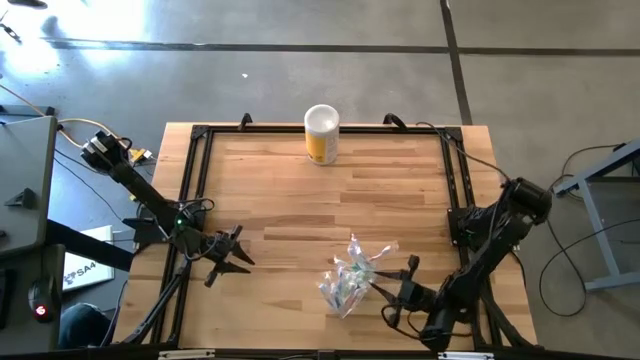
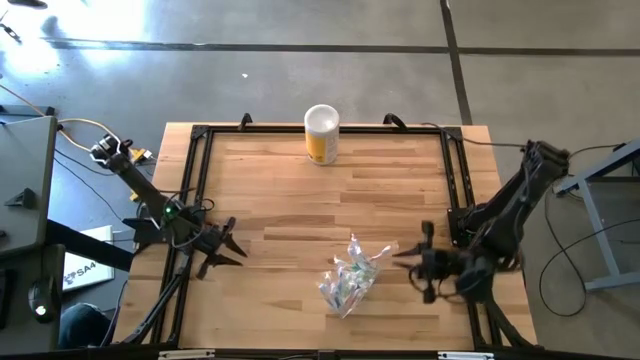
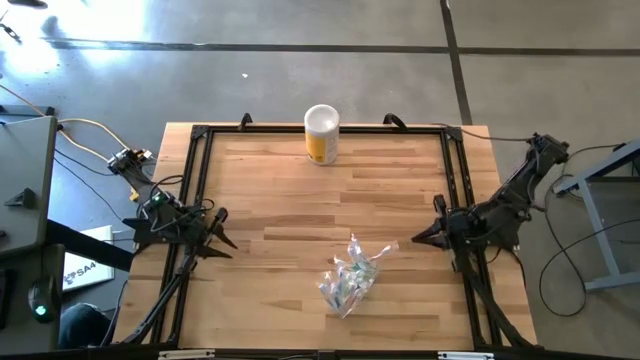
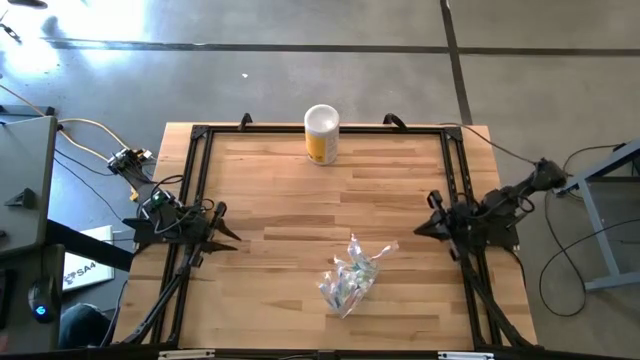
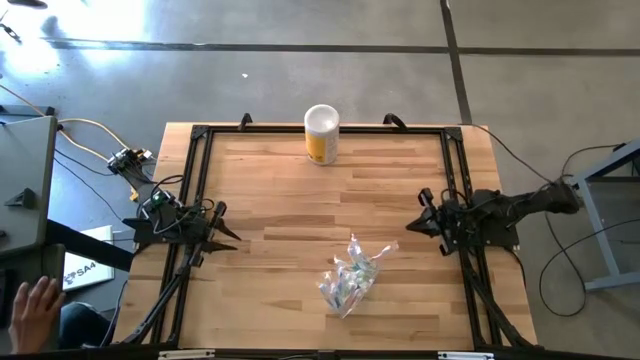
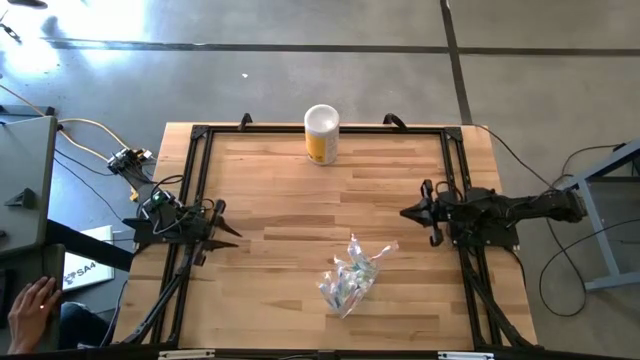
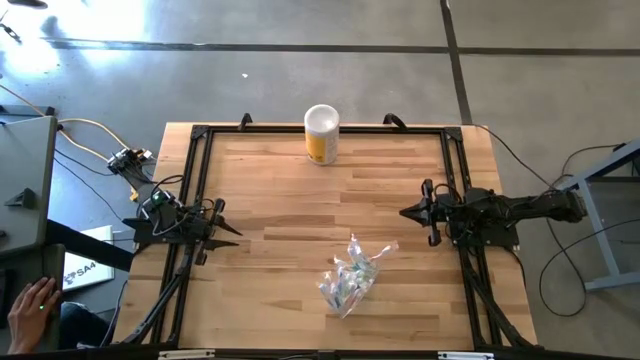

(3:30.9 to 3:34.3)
Task: Pick & Place toothbrushing station
Return to Home Position

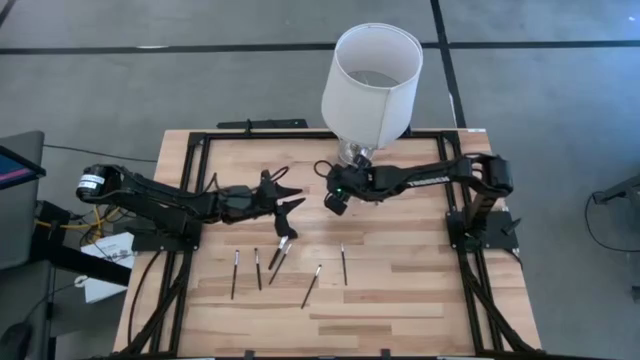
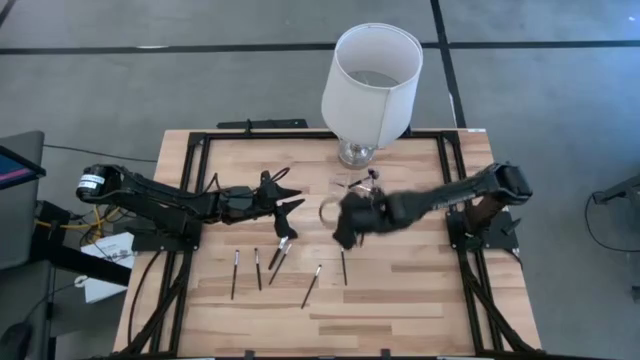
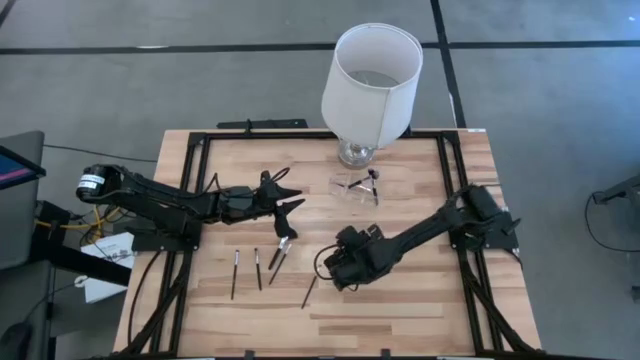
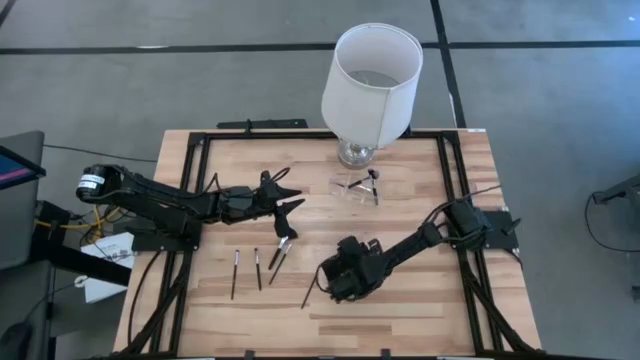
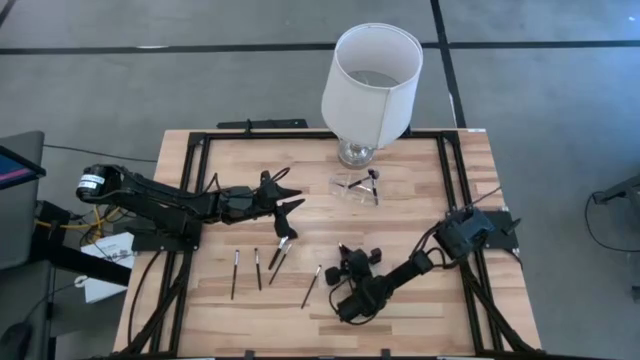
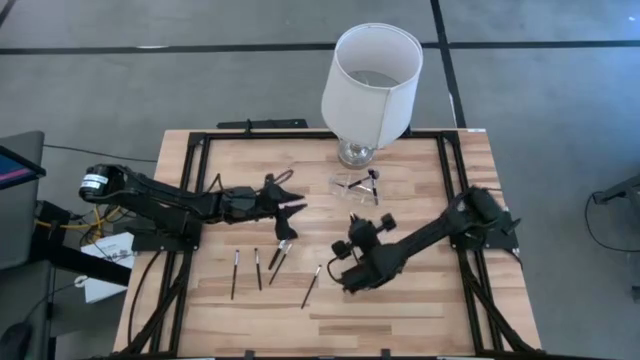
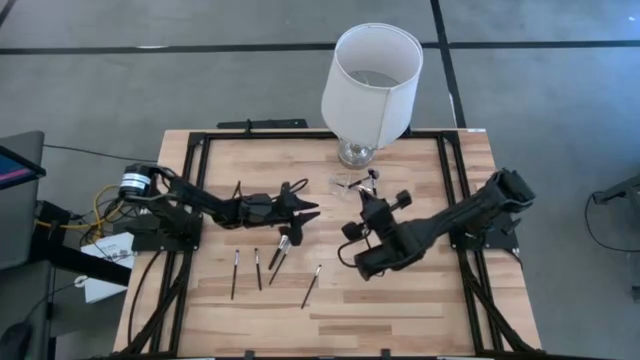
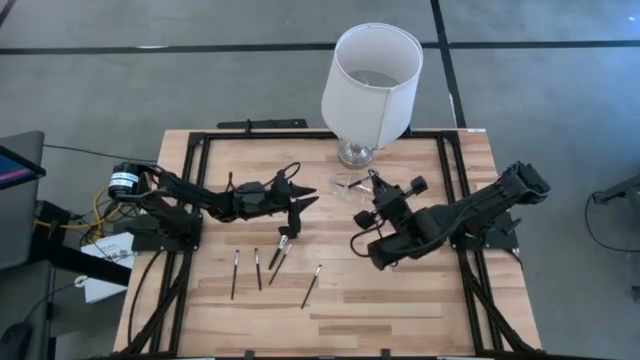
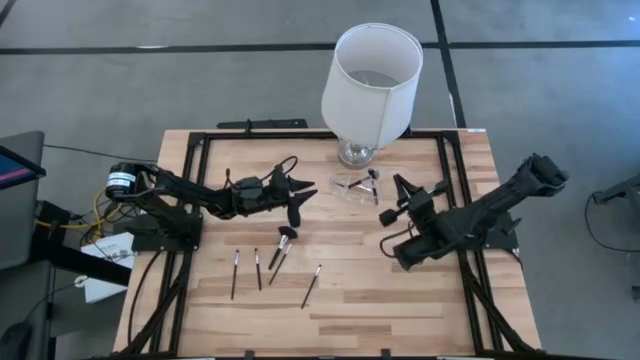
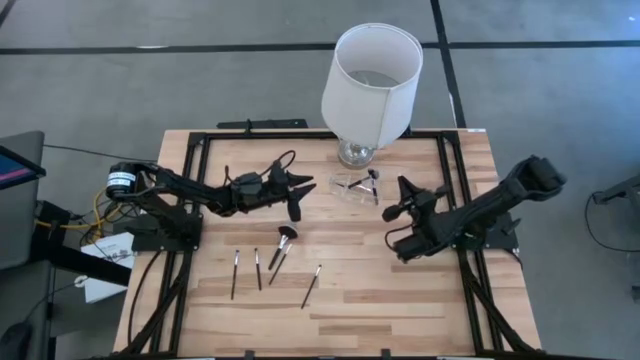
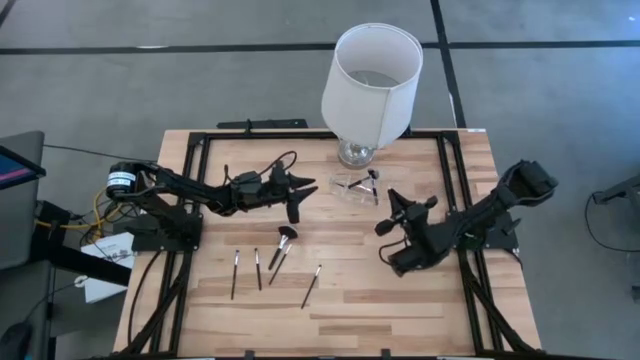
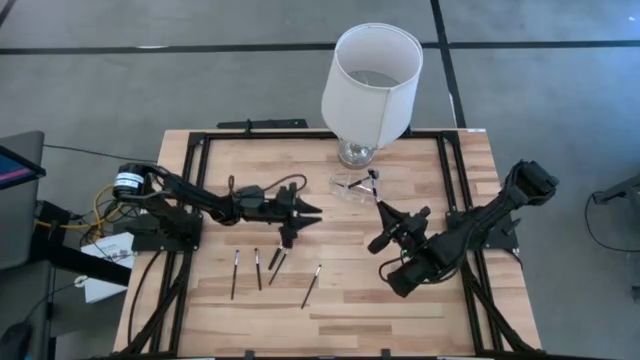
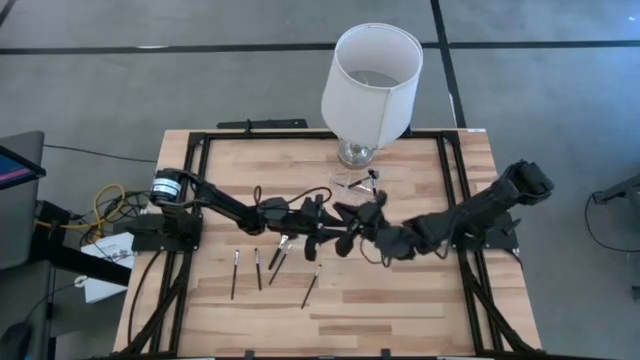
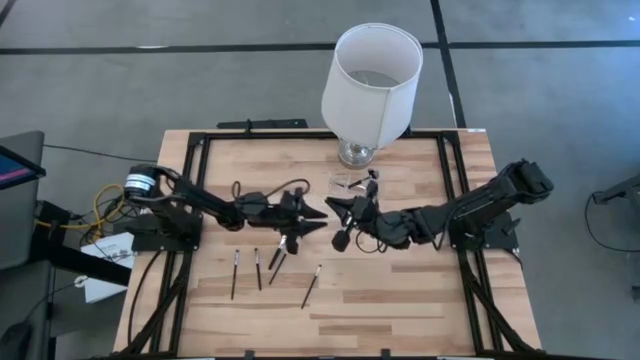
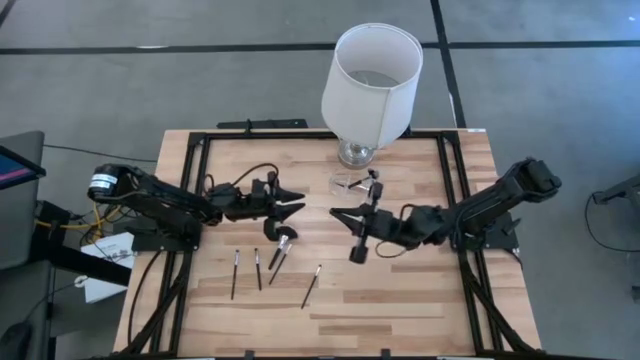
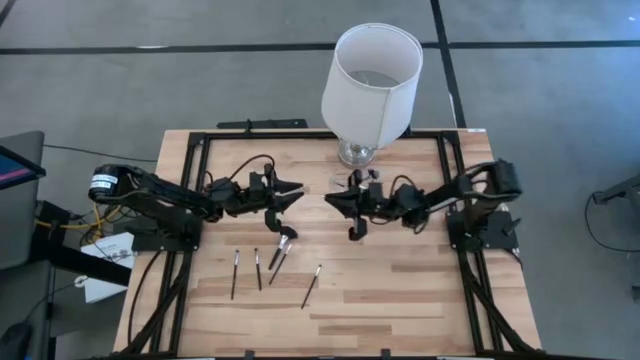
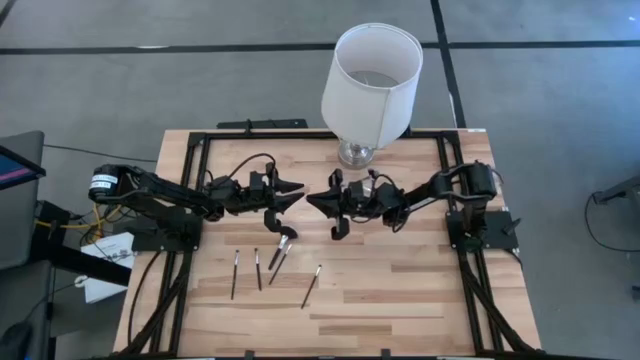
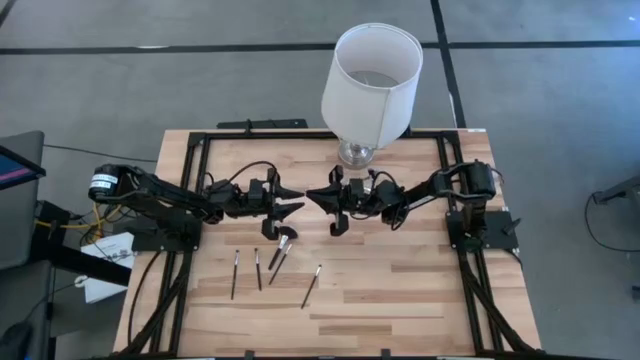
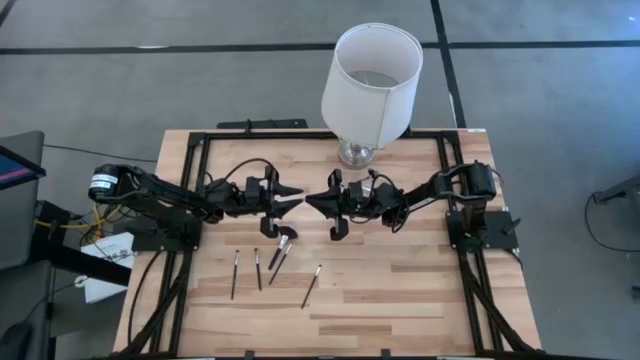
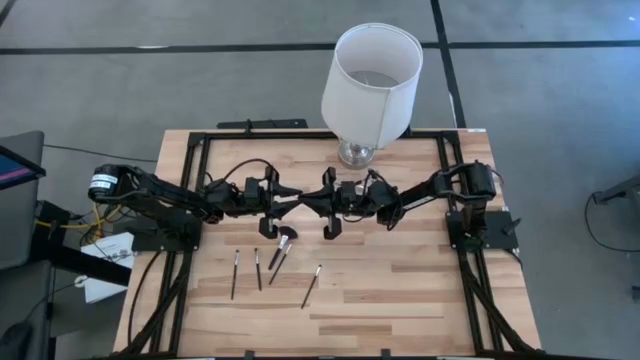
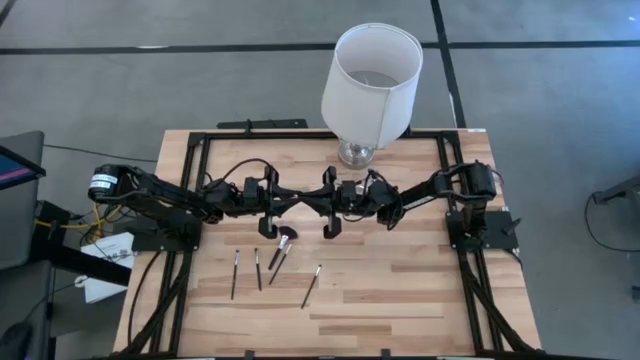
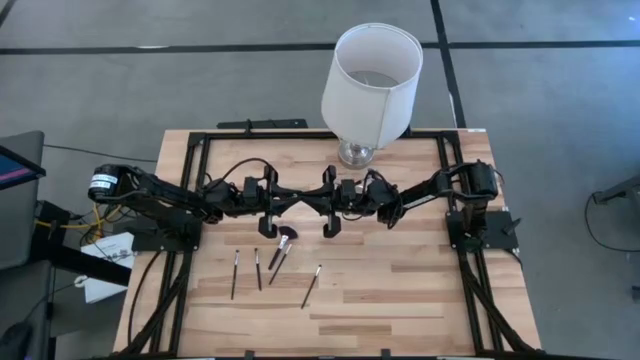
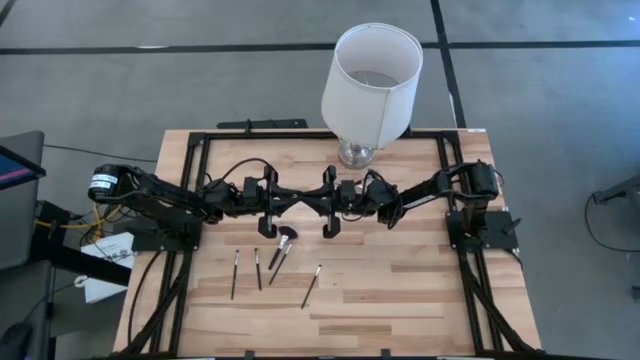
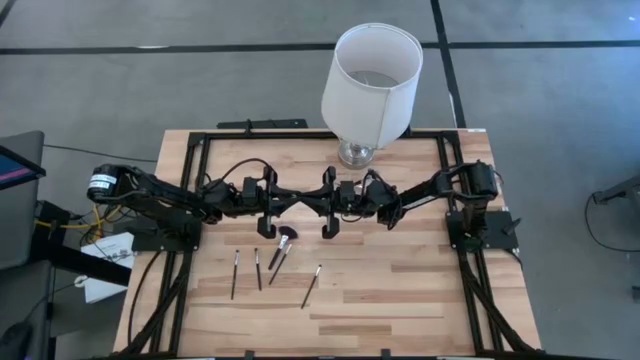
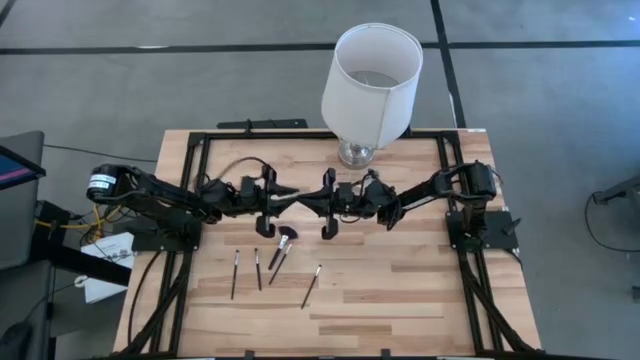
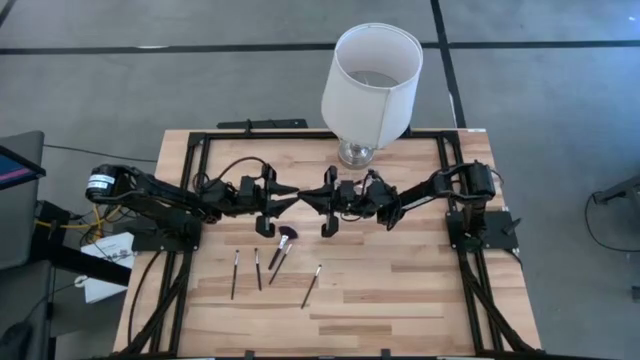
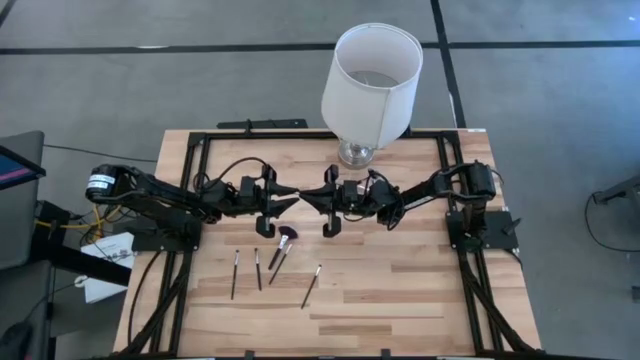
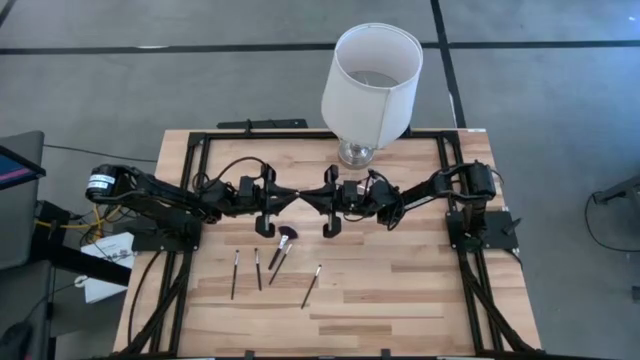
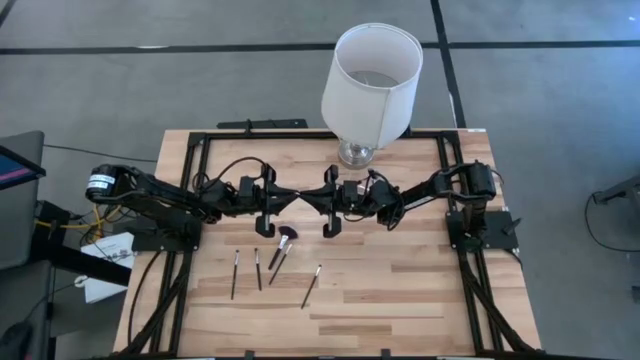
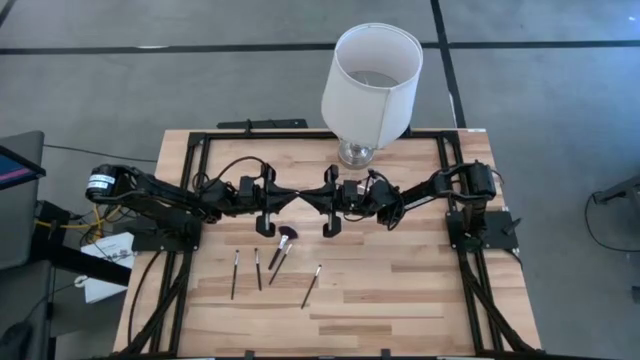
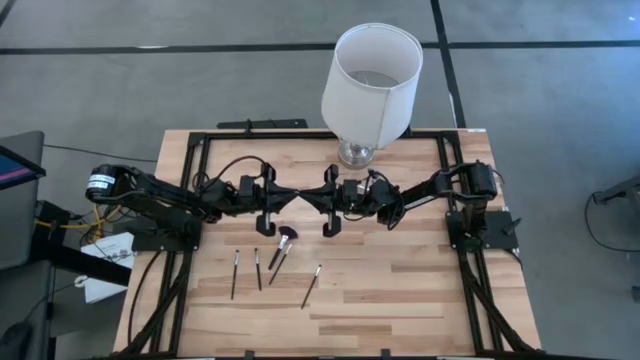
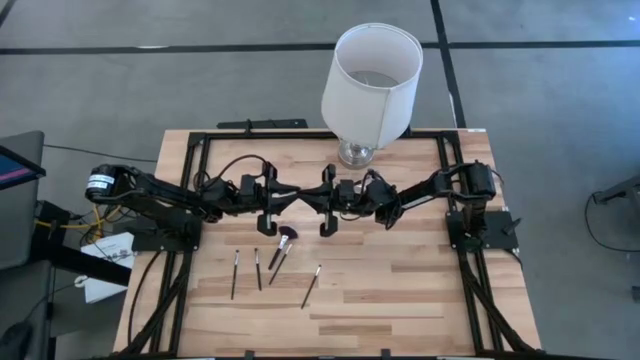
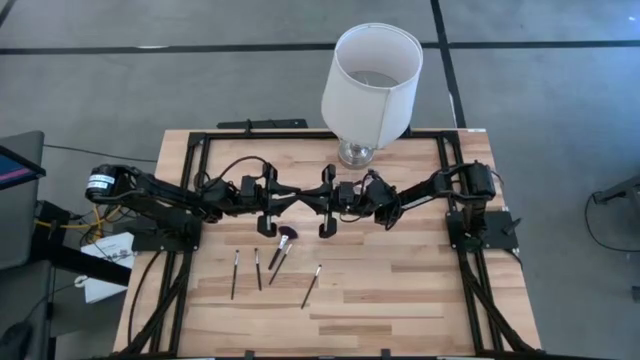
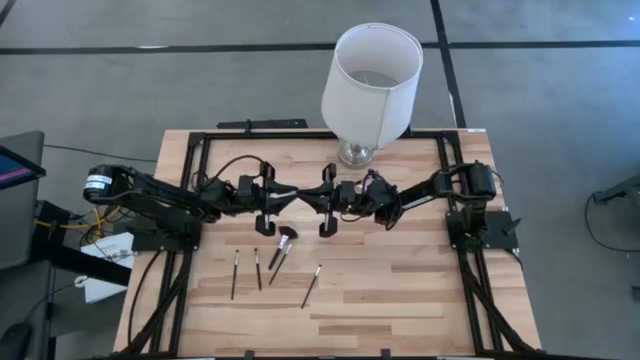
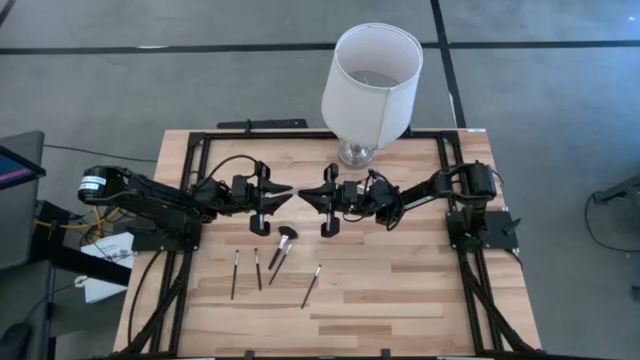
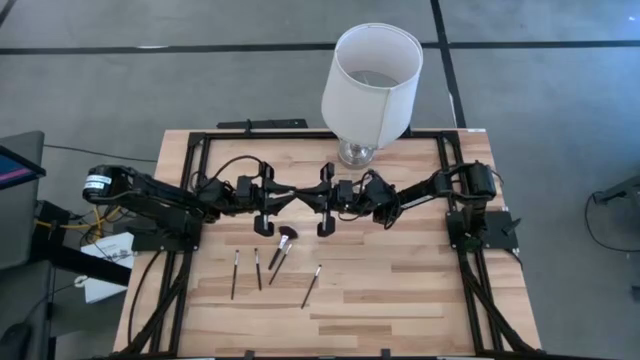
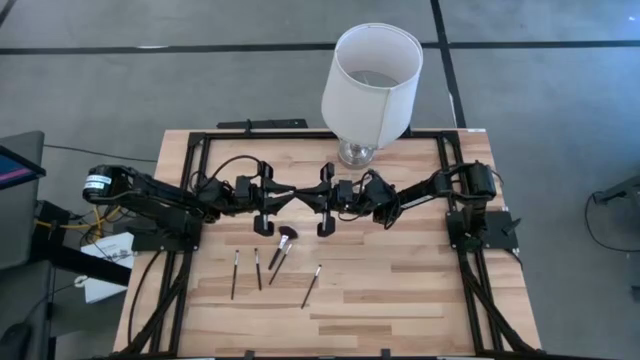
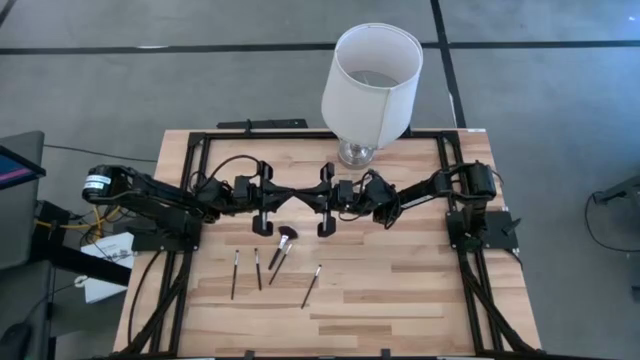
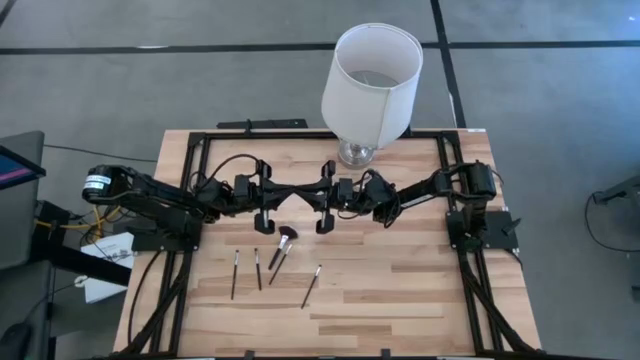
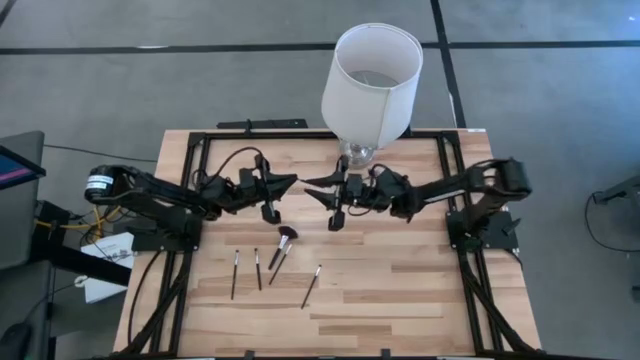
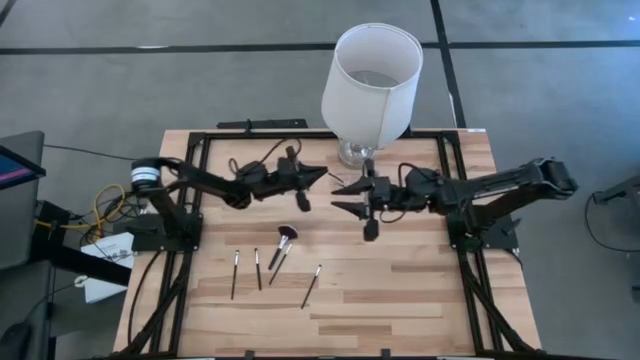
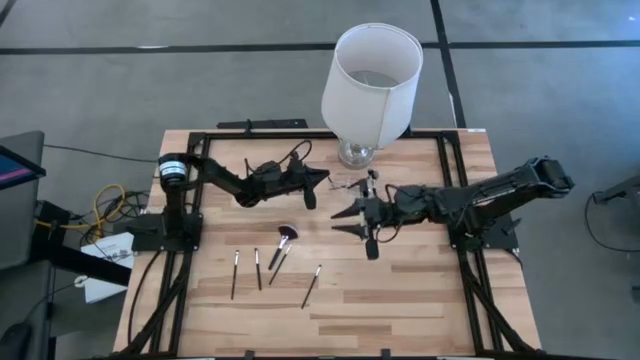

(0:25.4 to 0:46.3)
Task: Put items in baskets/containers
Put the liner brush into the transparent organizer
